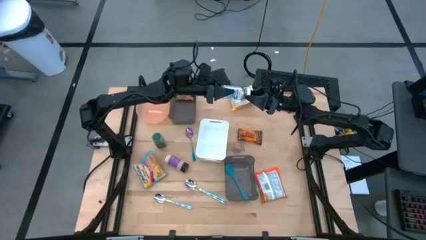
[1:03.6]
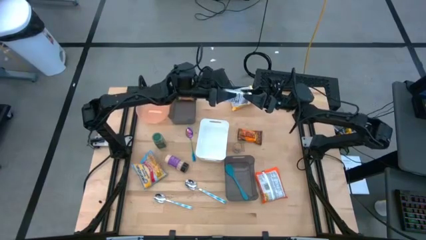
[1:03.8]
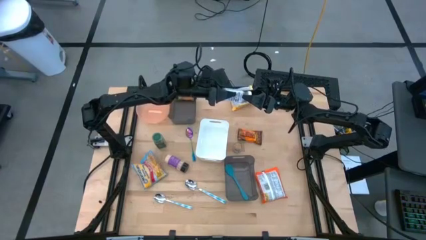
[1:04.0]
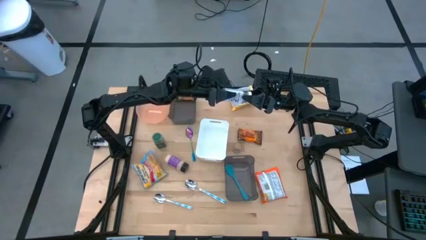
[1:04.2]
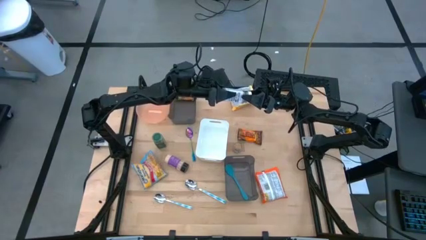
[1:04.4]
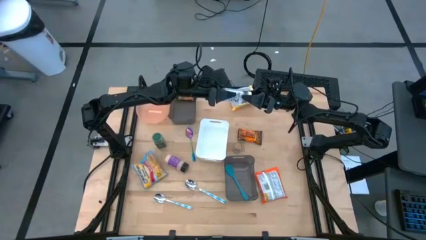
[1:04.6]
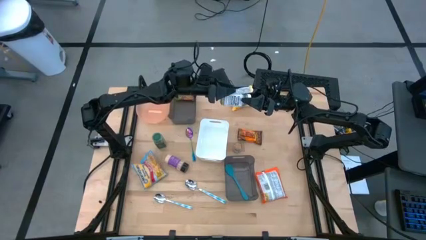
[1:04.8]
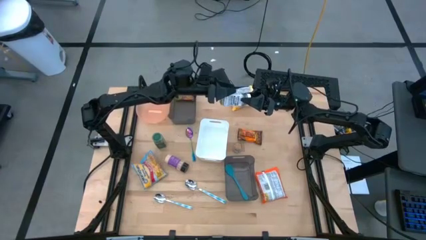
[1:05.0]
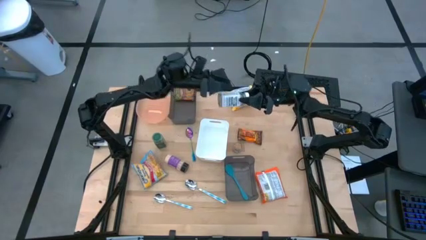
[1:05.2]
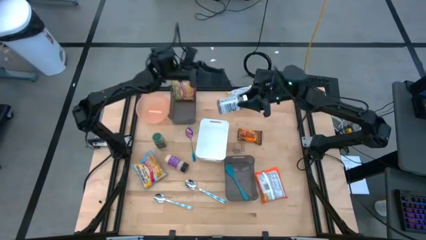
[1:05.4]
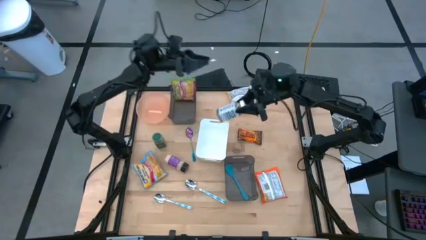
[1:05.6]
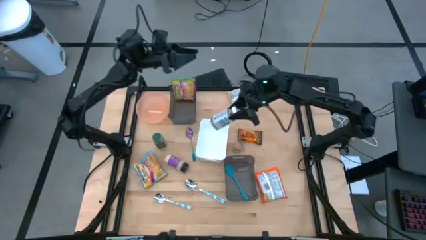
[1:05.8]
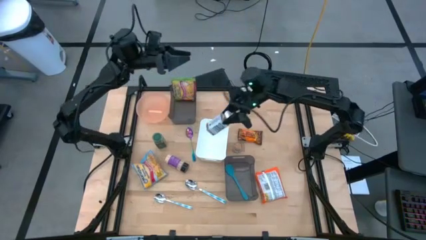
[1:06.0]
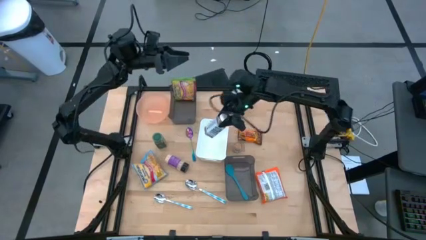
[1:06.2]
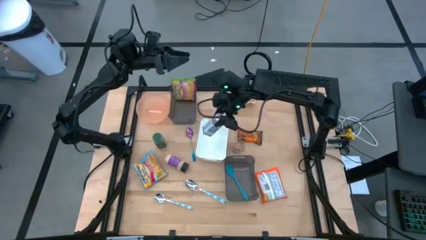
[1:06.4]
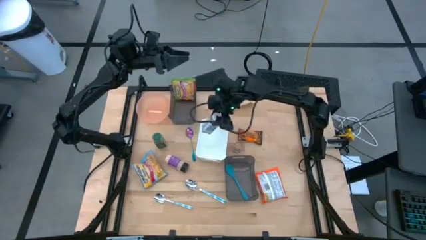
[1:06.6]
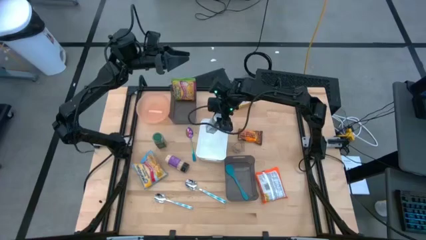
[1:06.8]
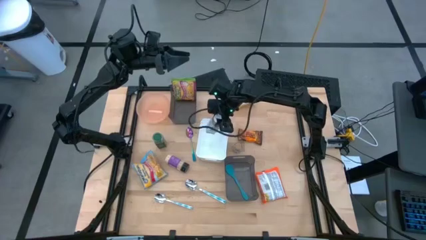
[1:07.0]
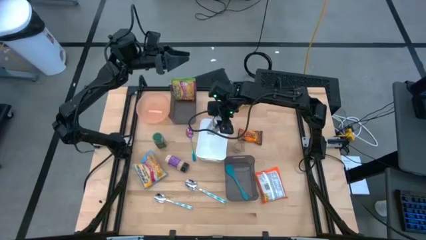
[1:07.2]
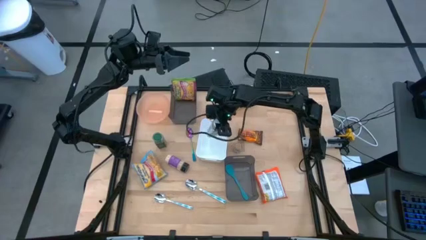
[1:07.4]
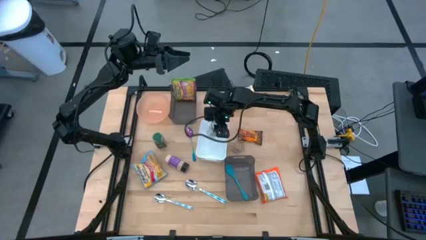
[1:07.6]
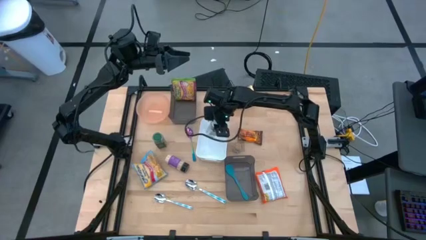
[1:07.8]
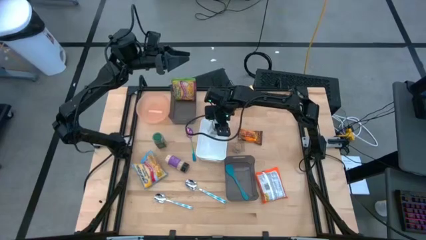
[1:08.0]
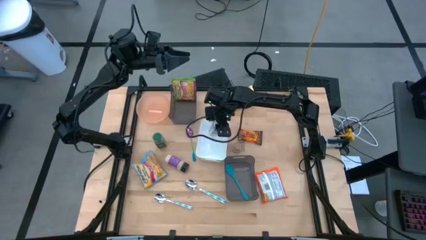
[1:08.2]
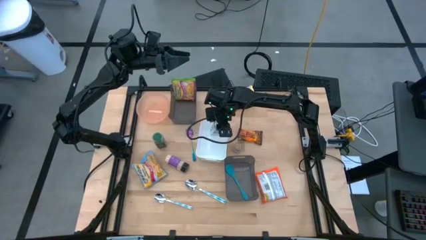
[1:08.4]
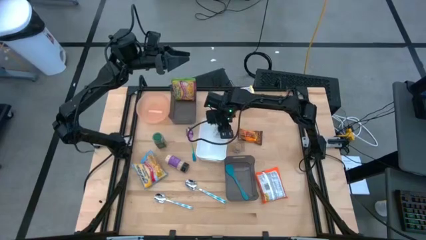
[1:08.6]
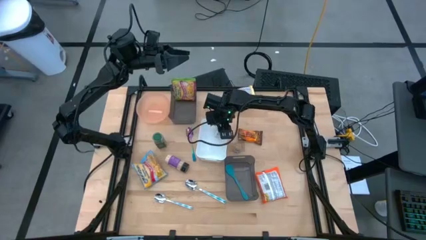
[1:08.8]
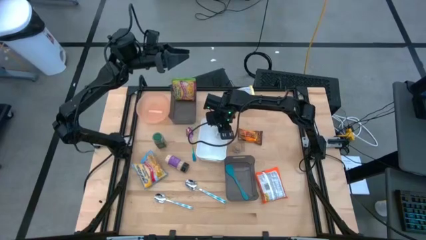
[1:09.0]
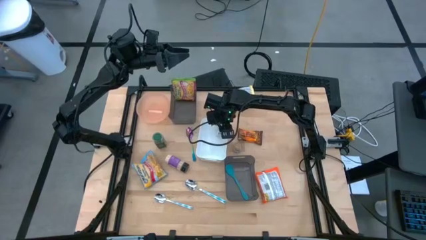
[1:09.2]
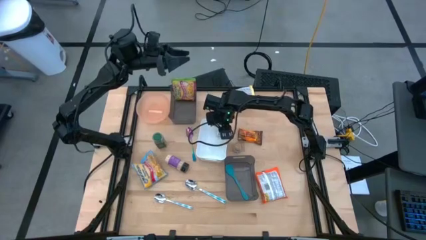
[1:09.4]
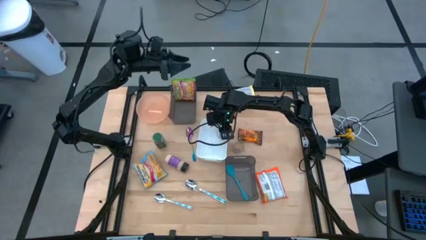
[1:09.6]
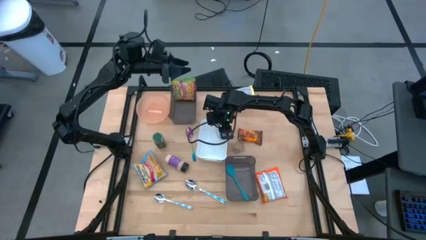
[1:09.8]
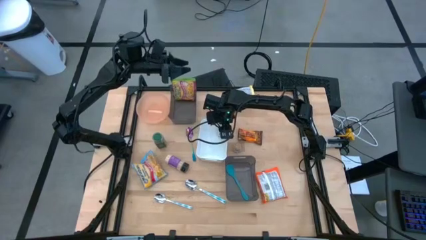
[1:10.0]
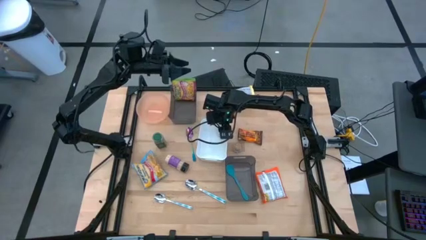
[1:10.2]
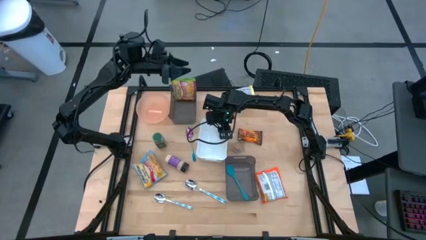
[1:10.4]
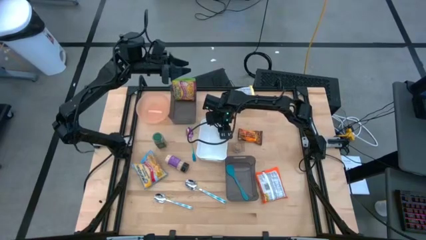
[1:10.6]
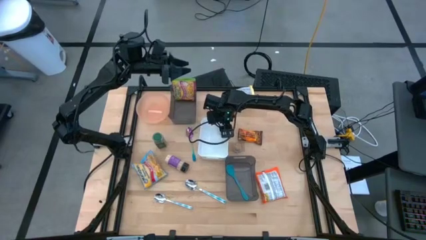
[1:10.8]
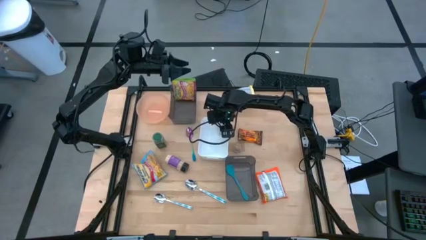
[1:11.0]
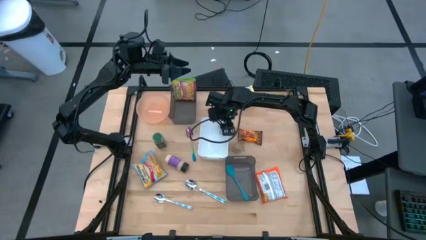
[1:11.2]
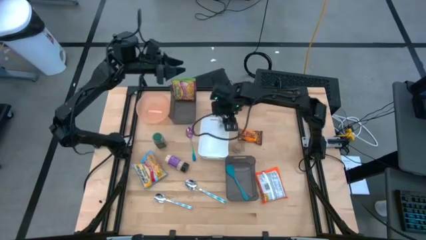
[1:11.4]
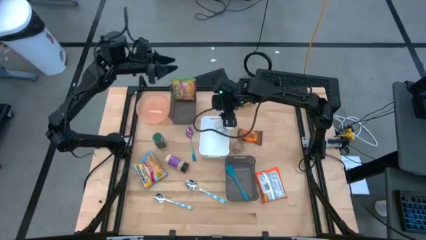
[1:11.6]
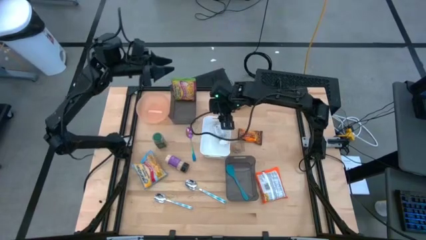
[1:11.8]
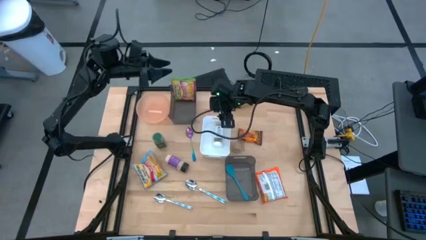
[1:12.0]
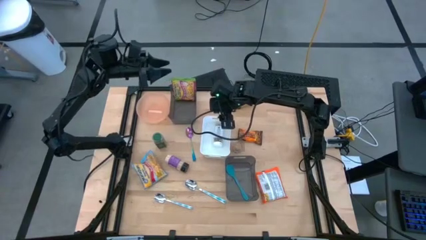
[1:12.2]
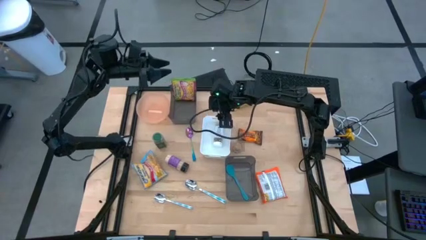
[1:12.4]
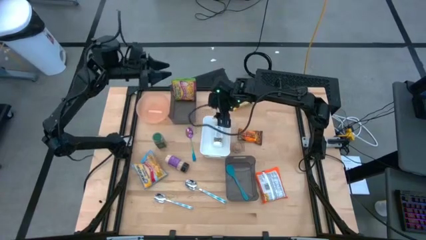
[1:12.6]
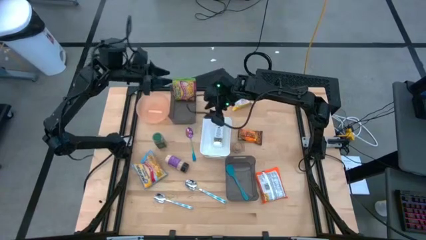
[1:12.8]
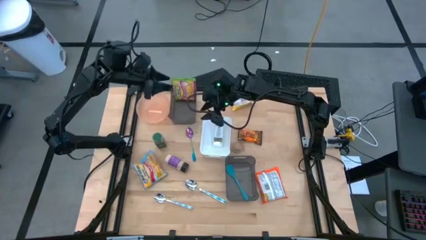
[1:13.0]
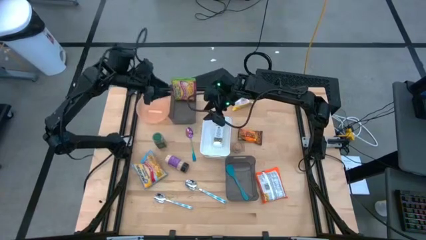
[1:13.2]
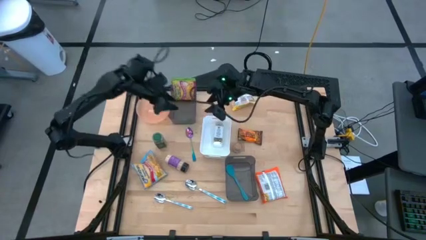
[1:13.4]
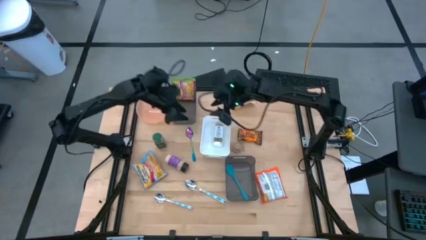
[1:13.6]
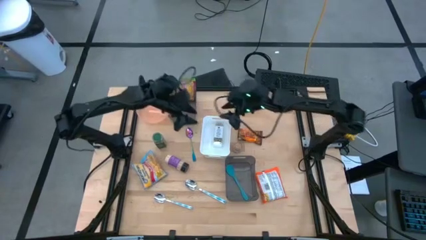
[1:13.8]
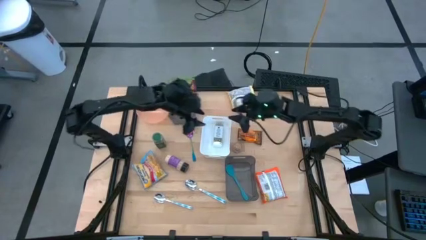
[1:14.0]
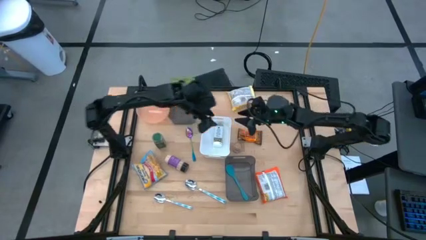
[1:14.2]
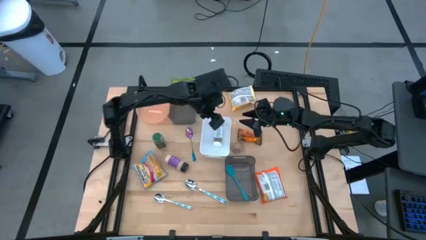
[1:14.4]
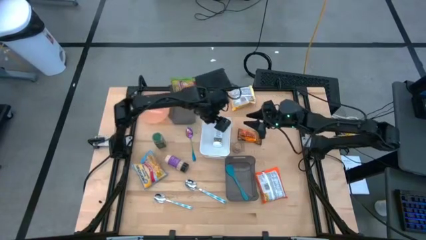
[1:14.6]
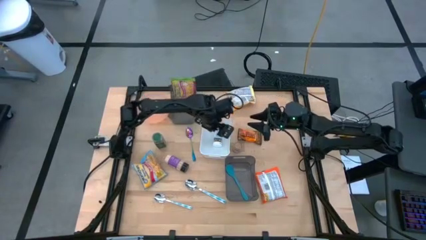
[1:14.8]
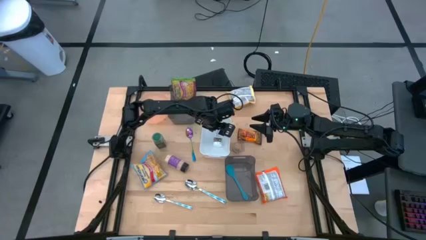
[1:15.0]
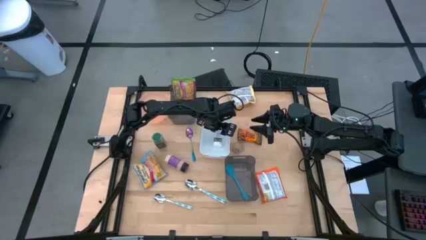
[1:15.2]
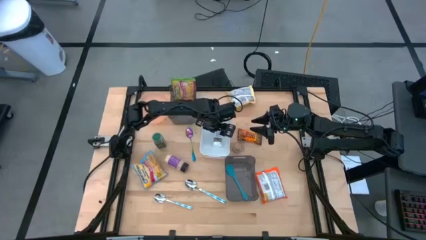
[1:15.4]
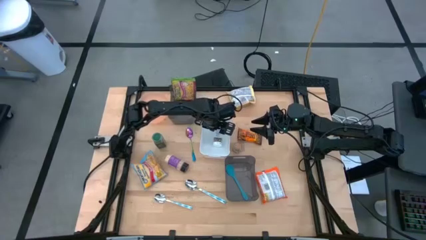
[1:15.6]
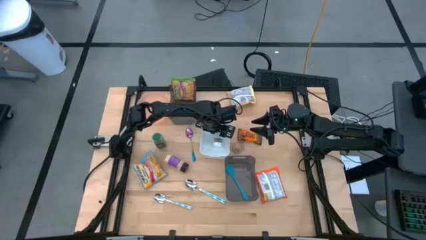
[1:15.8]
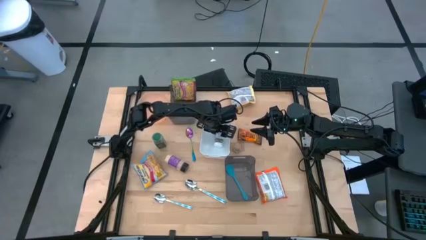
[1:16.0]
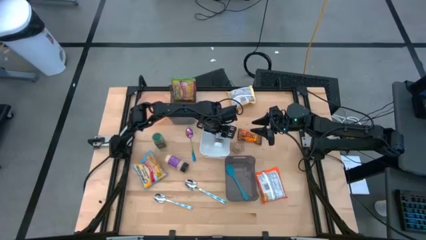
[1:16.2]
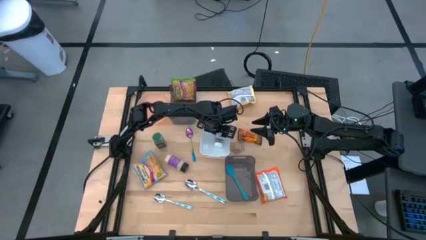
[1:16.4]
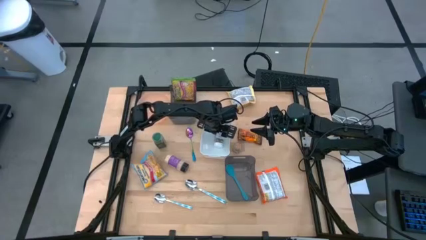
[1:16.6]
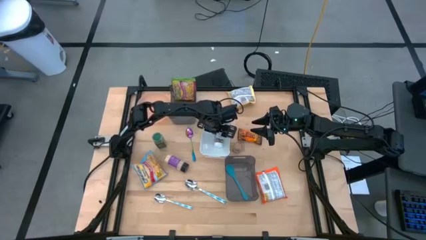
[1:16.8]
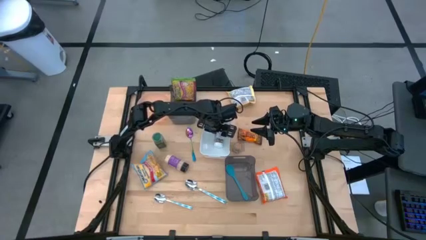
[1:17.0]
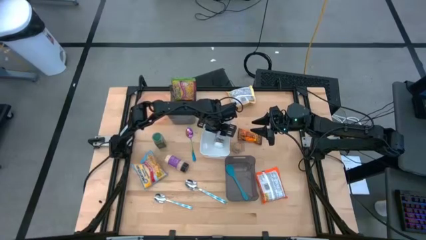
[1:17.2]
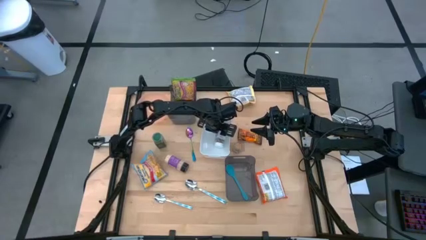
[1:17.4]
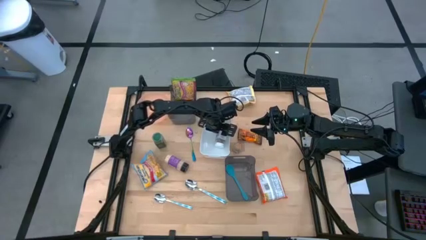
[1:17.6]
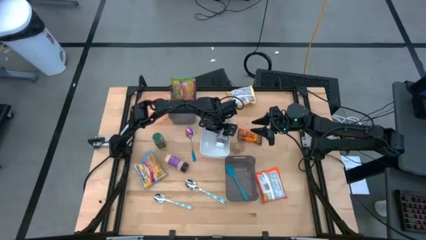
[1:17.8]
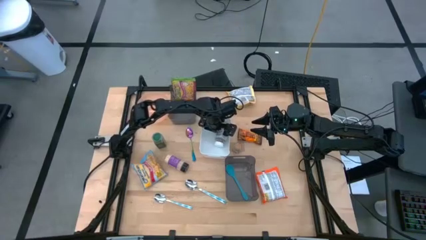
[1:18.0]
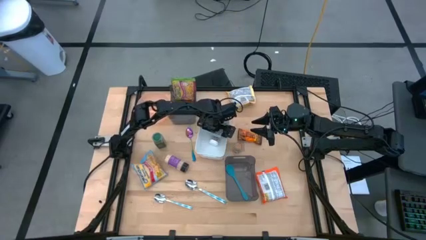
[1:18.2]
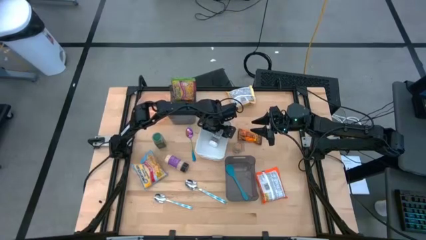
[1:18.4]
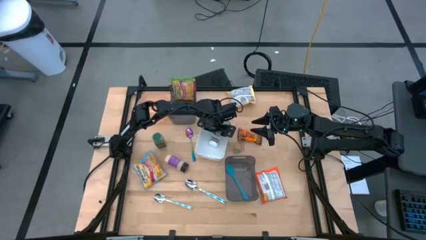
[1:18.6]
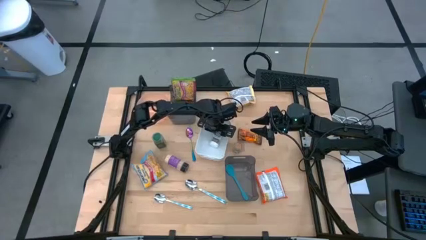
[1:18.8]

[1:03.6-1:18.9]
Task: Pick & Place Food Item
Put the white seasoning bottle into the white bin
